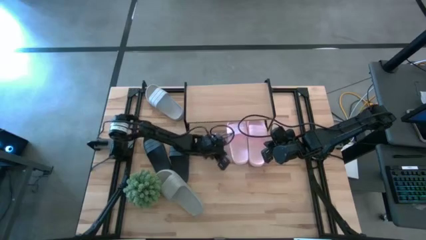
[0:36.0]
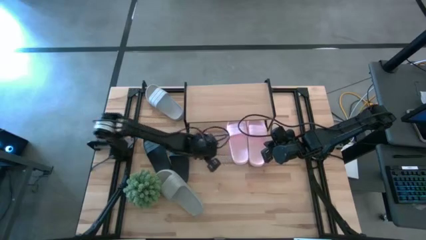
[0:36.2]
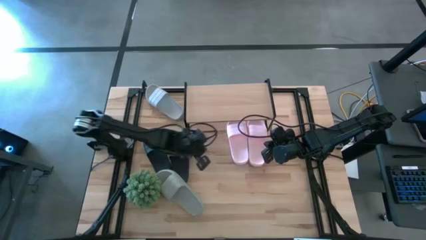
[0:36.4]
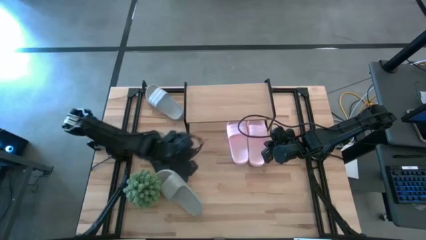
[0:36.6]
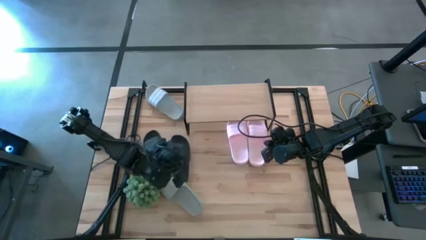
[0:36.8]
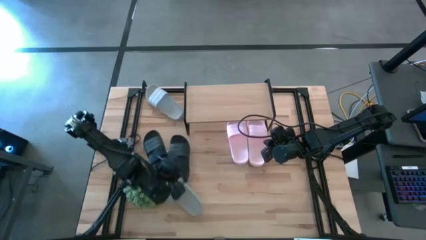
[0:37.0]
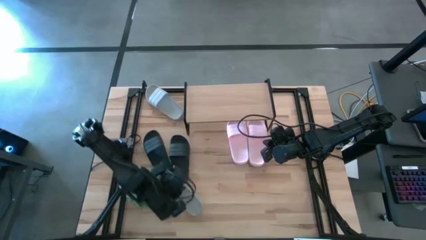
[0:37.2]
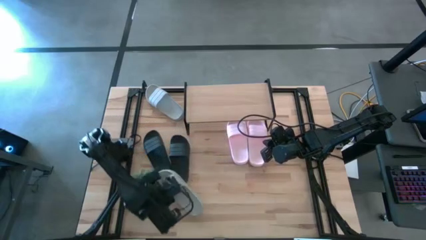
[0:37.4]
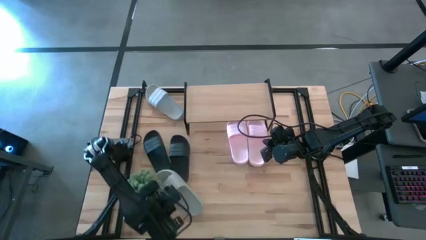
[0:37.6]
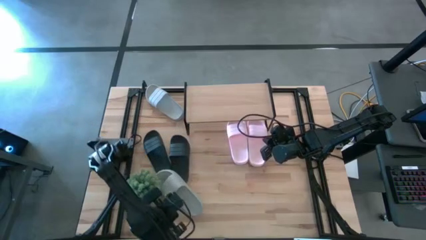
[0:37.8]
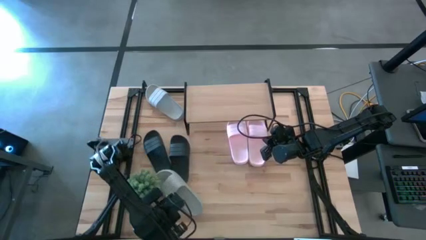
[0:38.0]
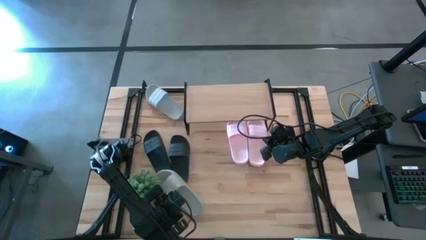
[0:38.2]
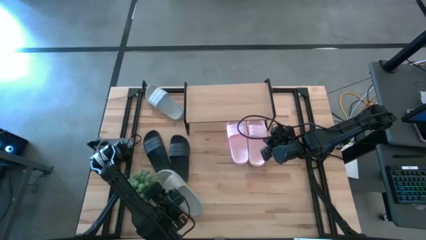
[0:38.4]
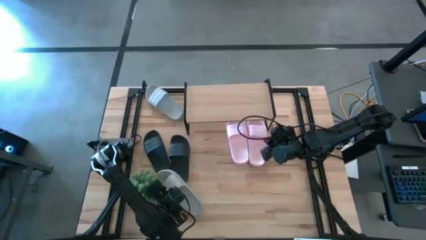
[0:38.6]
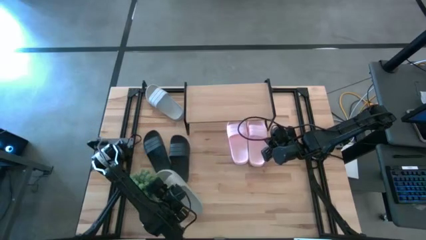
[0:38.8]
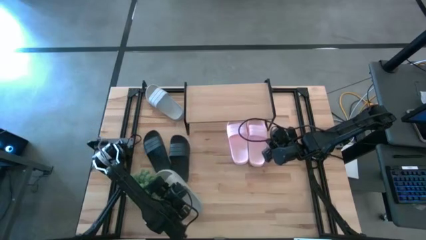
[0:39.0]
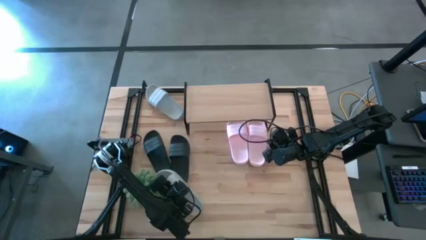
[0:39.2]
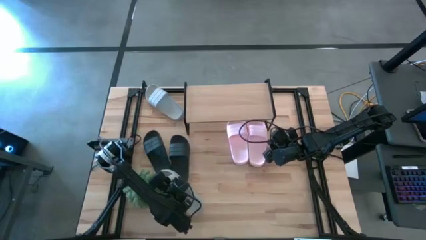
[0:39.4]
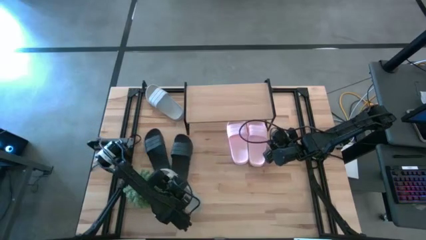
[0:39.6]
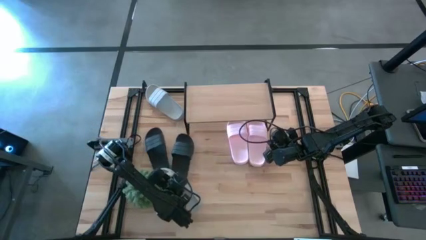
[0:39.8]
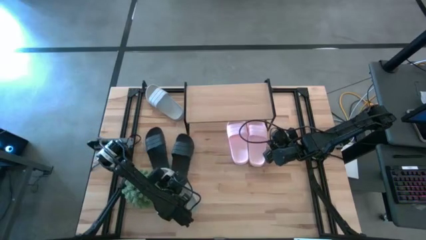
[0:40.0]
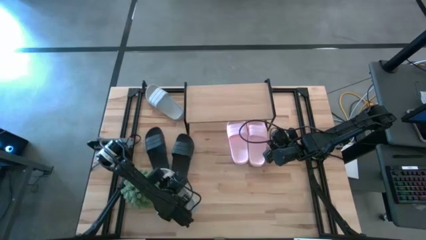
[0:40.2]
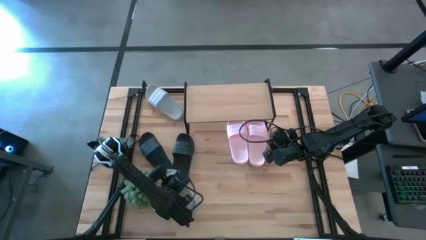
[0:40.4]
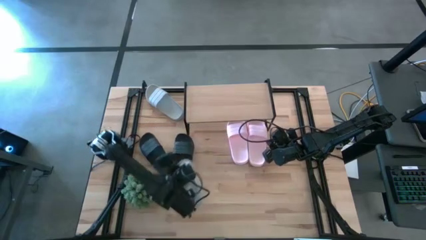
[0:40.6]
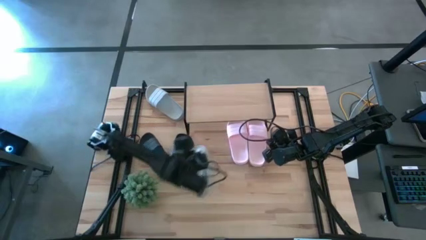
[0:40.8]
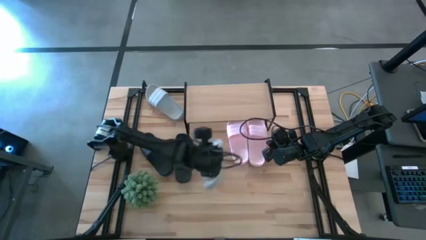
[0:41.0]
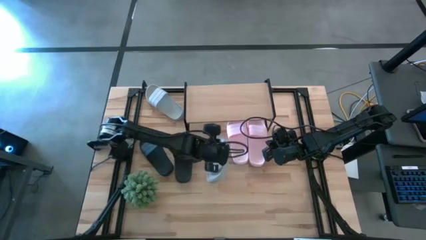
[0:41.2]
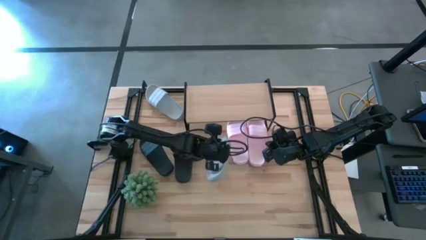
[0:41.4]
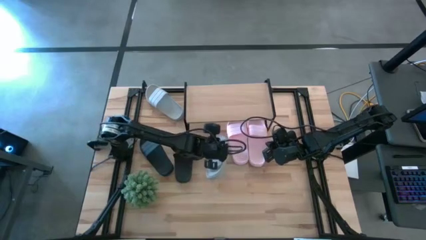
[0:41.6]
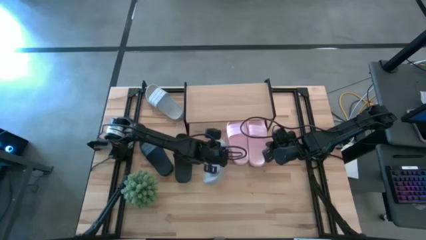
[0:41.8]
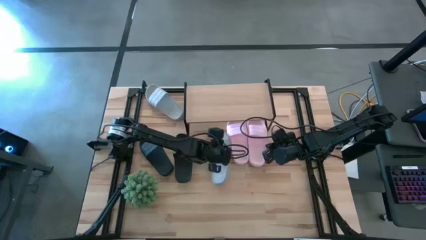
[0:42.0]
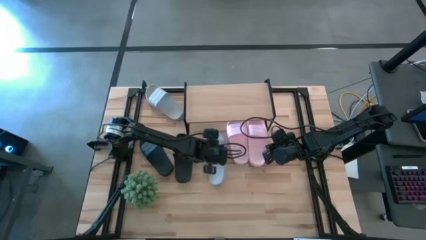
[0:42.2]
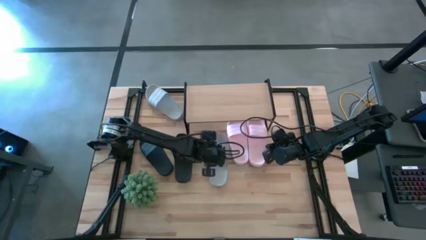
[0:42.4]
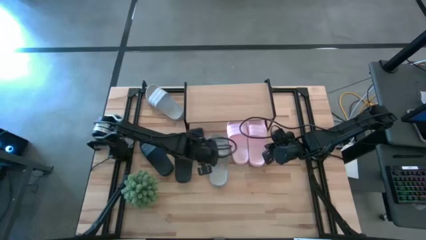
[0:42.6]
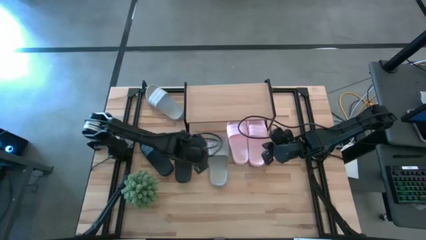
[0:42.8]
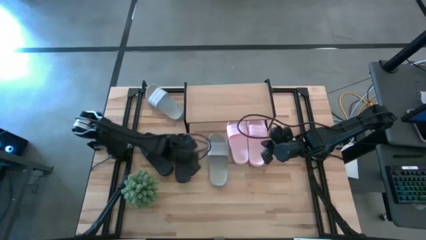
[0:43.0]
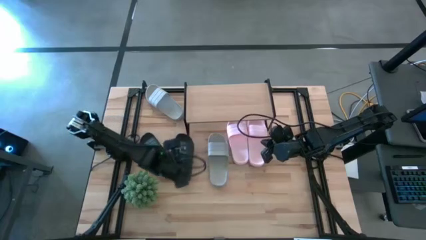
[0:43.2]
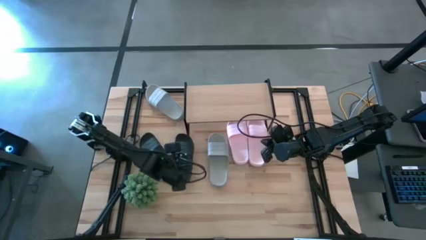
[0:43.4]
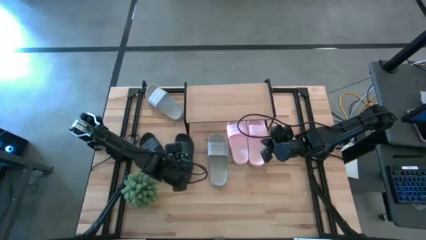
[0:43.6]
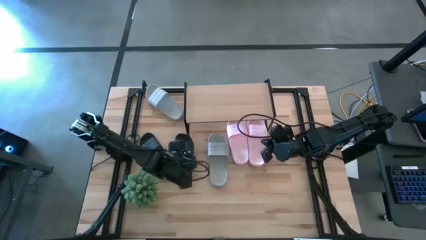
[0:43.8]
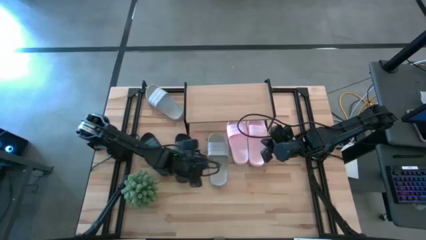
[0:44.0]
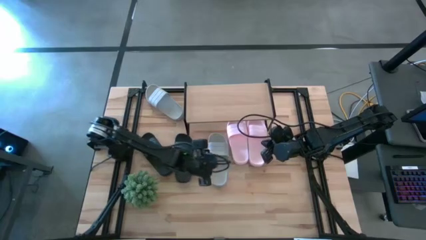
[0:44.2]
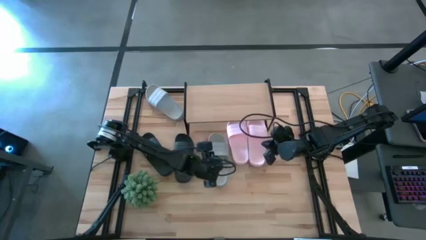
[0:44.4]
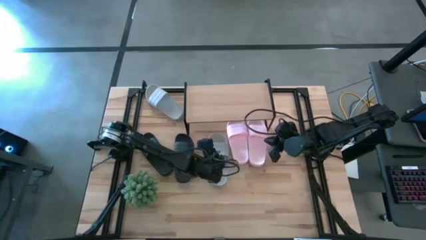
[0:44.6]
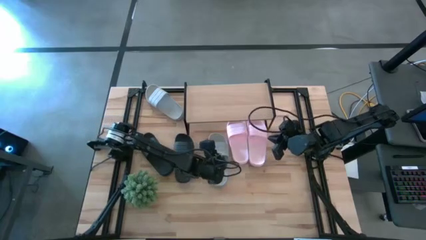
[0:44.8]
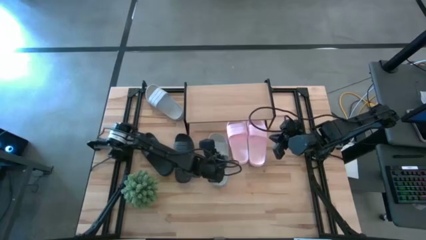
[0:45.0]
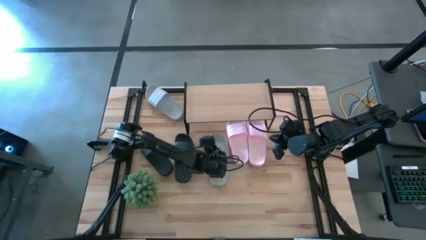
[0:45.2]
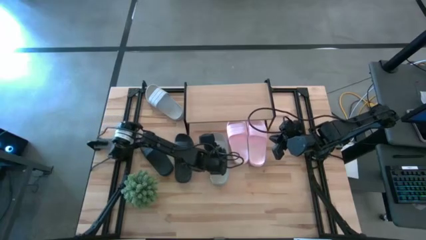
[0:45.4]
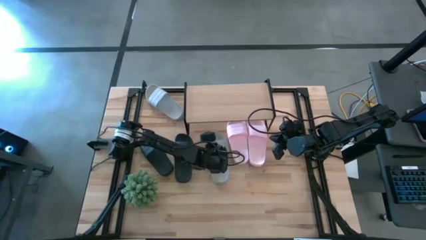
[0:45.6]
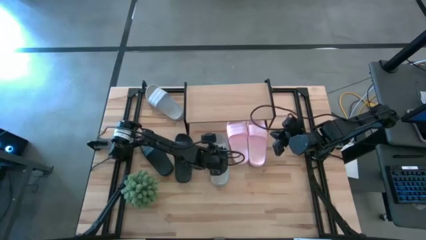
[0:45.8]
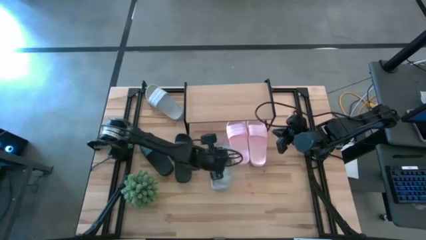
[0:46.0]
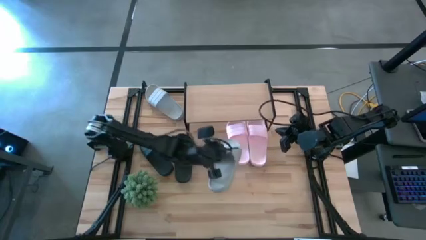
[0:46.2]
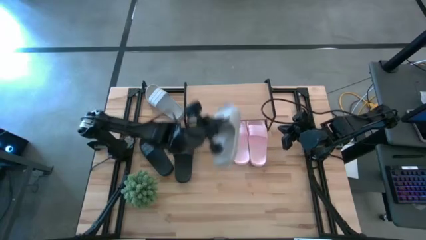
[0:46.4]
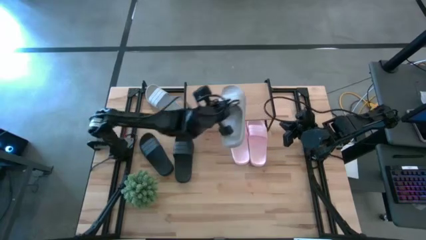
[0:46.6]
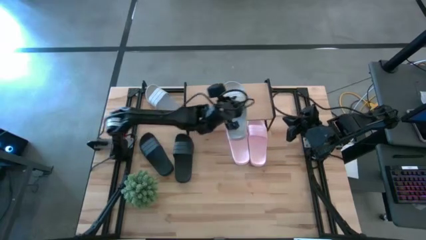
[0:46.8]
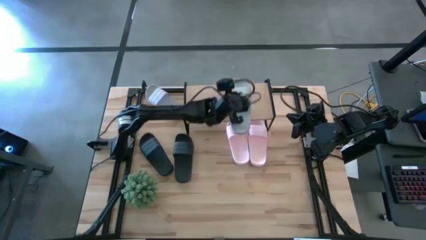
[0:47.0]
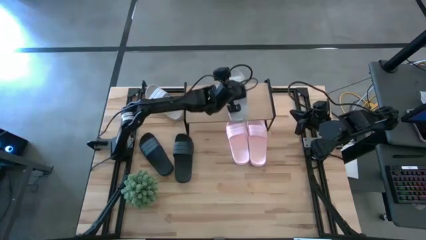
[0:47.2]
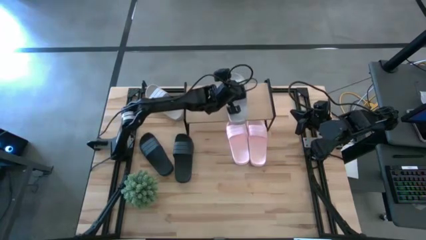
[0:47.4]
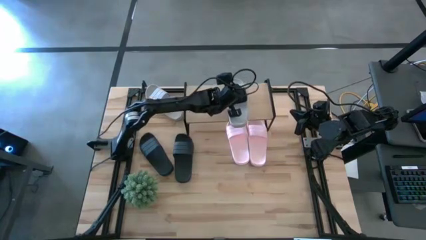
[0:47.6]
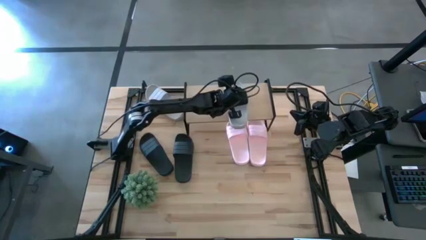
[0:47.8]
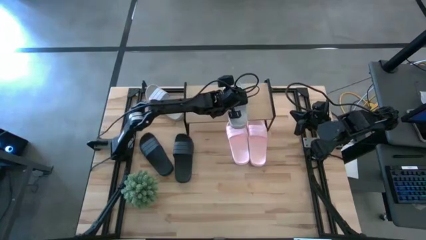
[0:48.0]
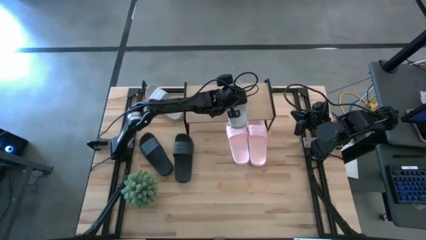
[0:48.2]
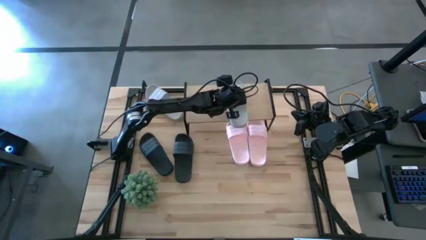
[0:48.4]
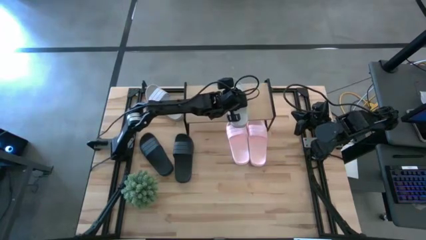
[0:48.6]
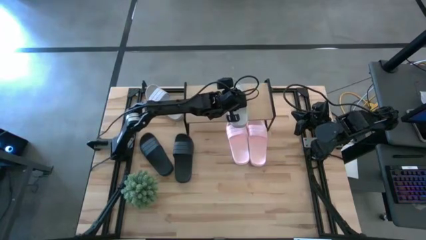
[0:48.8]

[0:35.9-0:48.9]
Task: Pick and place slides into the shelf
Put the gray slide on the shelf
